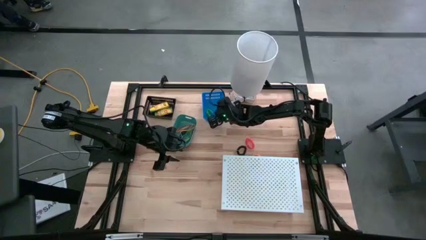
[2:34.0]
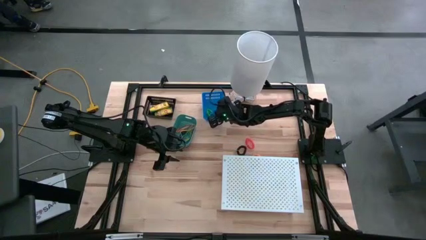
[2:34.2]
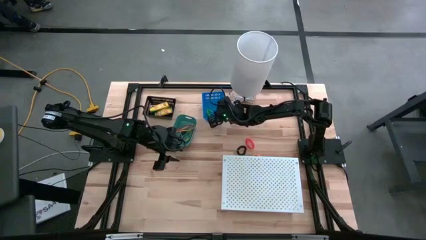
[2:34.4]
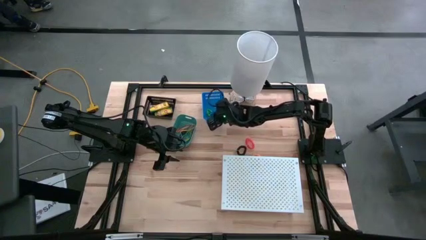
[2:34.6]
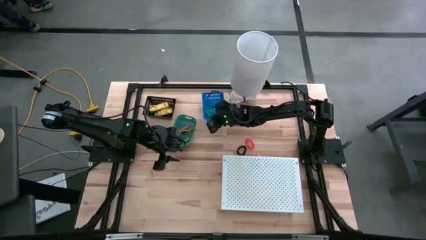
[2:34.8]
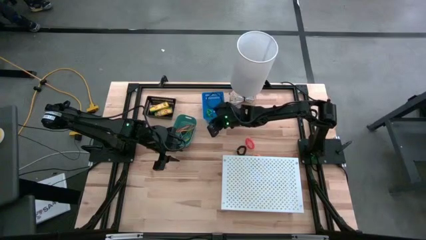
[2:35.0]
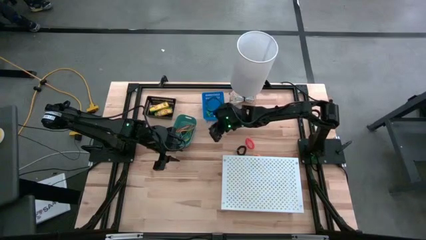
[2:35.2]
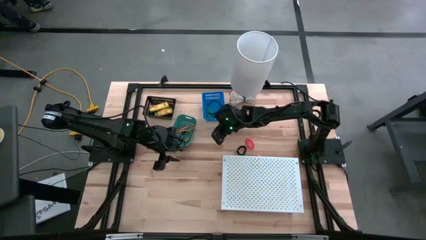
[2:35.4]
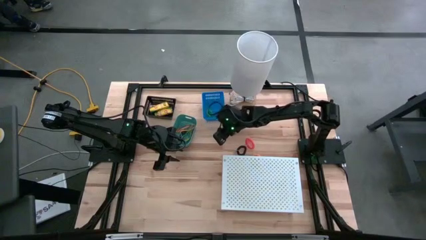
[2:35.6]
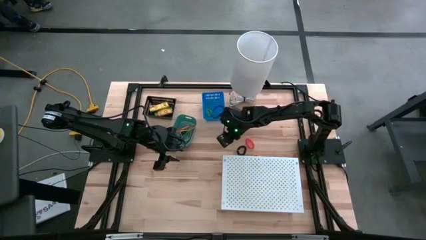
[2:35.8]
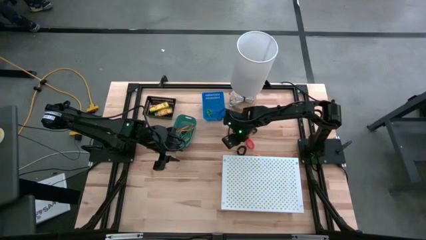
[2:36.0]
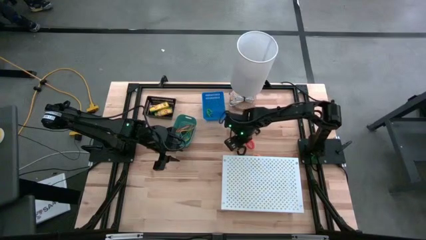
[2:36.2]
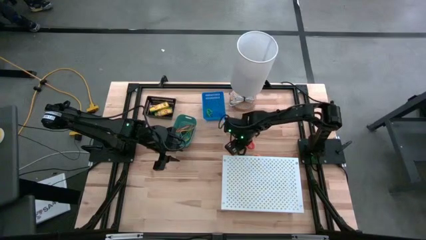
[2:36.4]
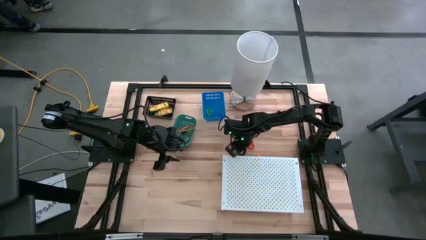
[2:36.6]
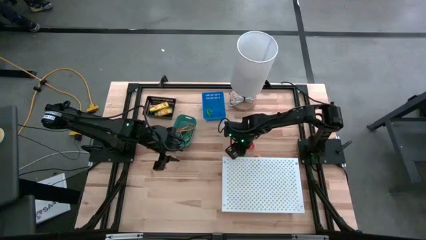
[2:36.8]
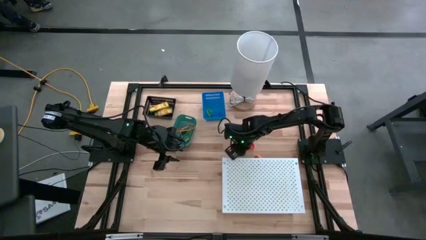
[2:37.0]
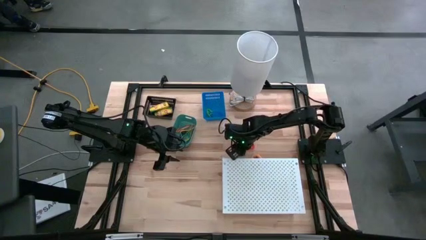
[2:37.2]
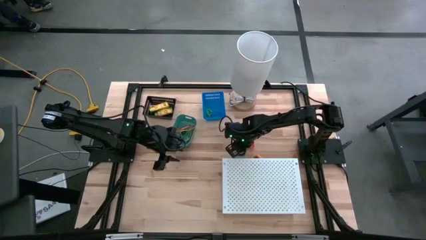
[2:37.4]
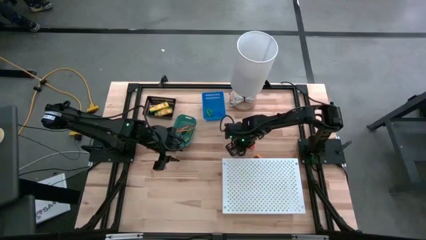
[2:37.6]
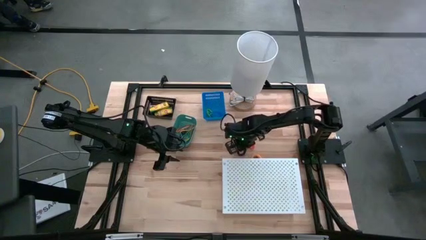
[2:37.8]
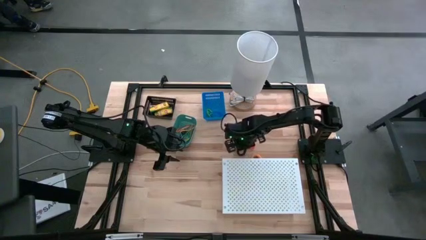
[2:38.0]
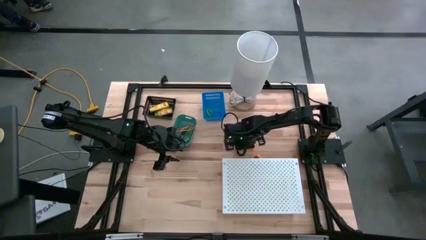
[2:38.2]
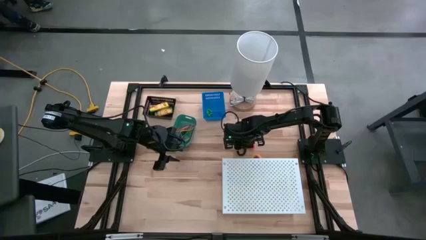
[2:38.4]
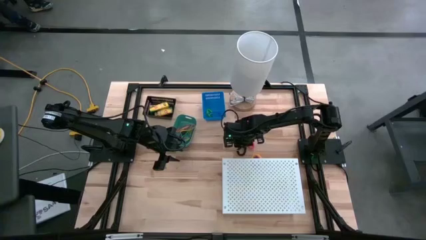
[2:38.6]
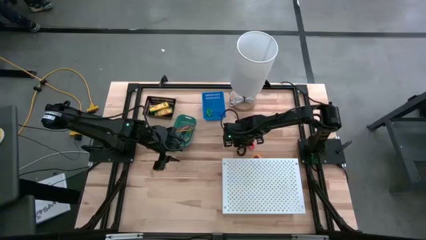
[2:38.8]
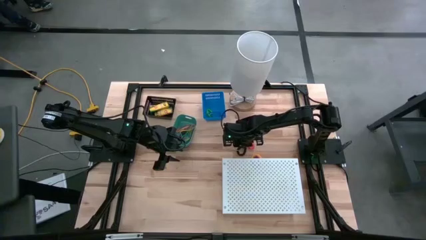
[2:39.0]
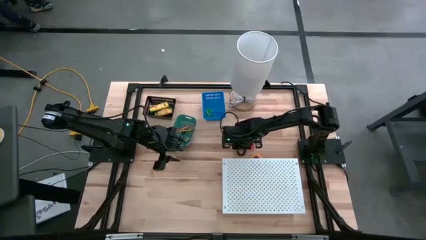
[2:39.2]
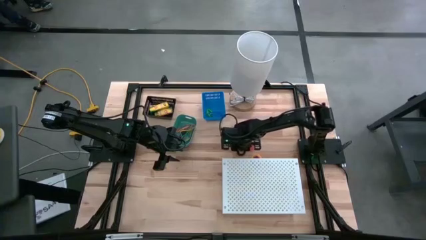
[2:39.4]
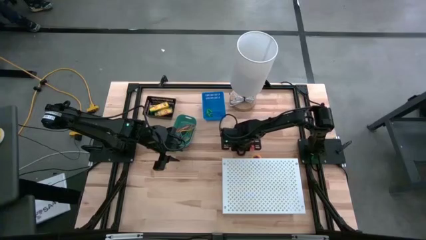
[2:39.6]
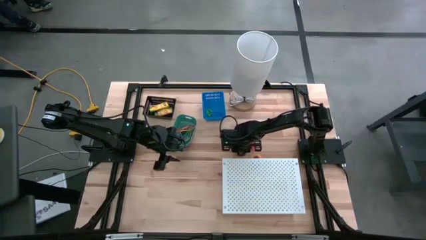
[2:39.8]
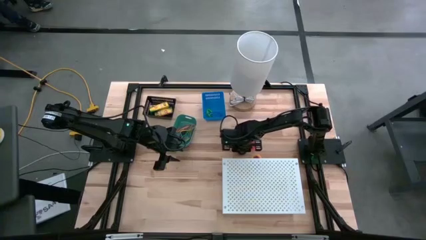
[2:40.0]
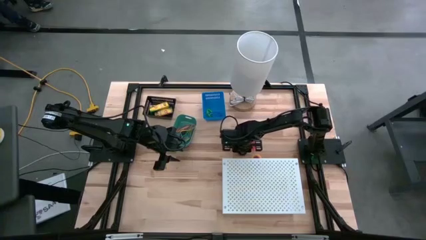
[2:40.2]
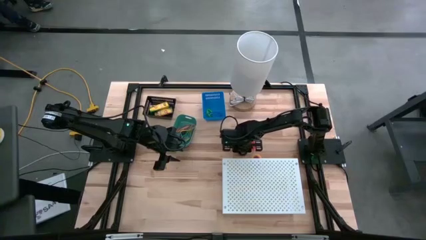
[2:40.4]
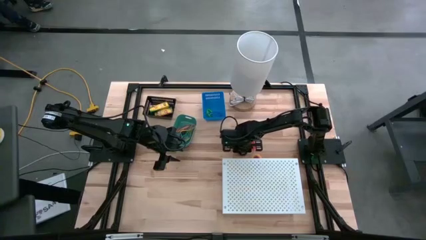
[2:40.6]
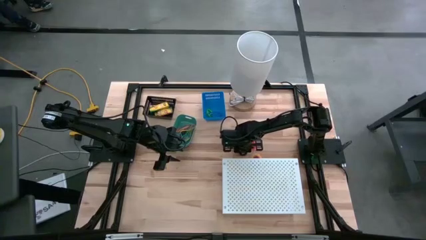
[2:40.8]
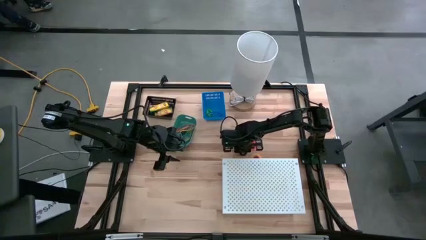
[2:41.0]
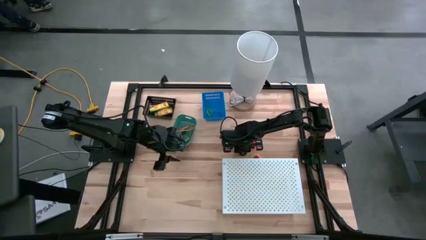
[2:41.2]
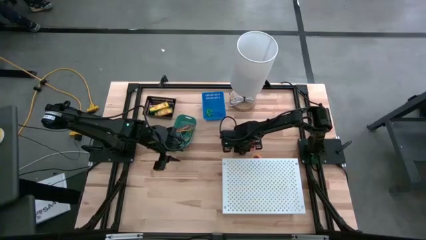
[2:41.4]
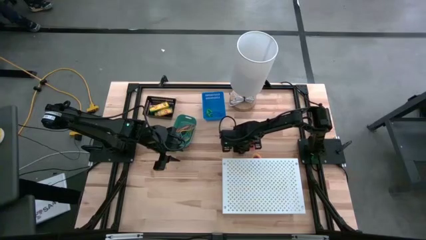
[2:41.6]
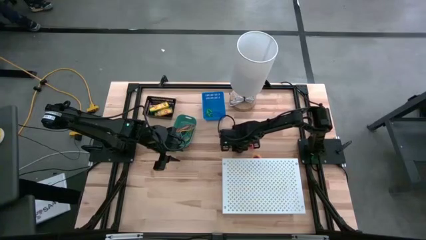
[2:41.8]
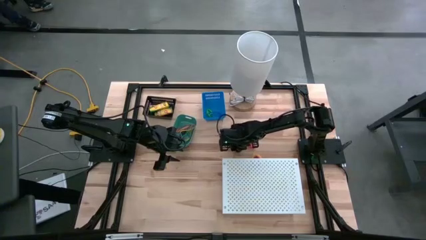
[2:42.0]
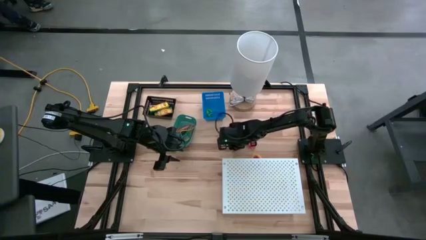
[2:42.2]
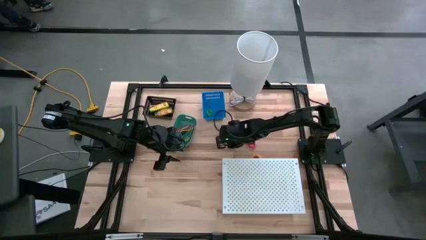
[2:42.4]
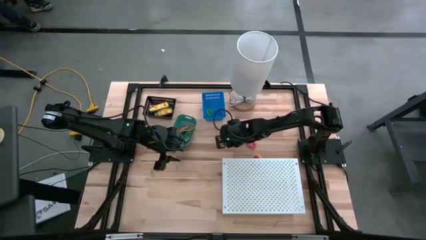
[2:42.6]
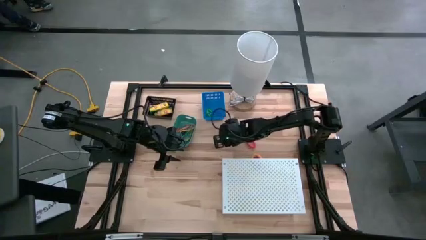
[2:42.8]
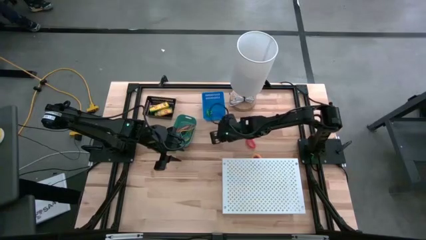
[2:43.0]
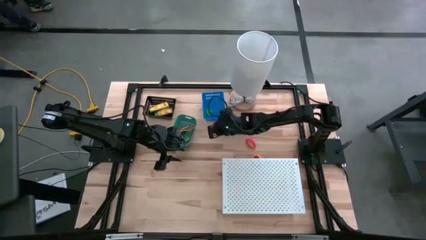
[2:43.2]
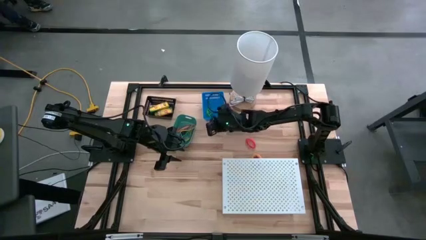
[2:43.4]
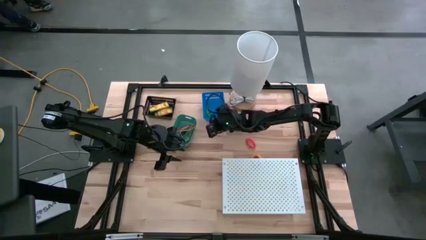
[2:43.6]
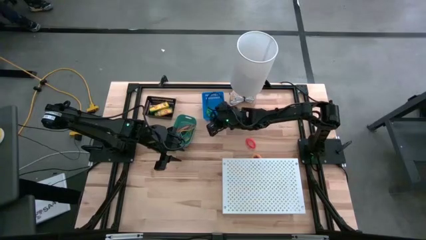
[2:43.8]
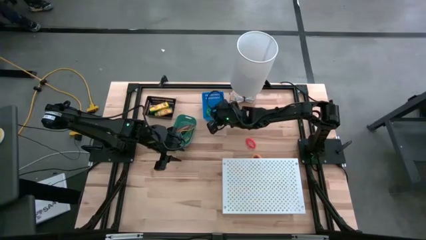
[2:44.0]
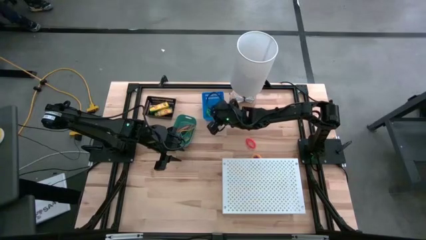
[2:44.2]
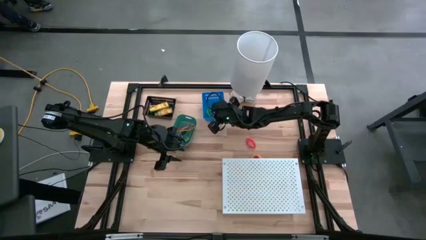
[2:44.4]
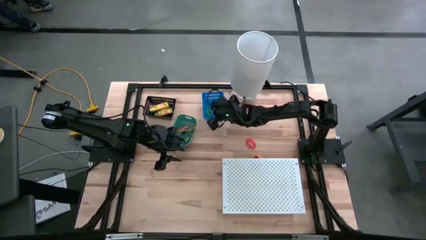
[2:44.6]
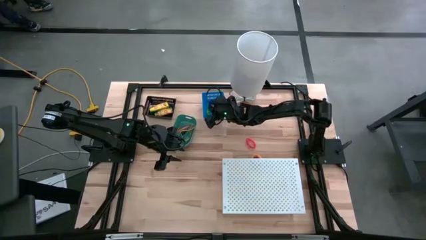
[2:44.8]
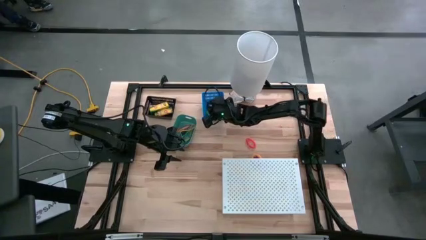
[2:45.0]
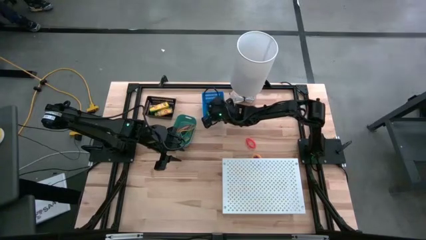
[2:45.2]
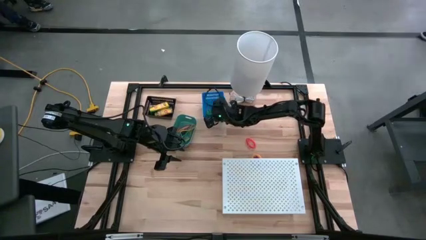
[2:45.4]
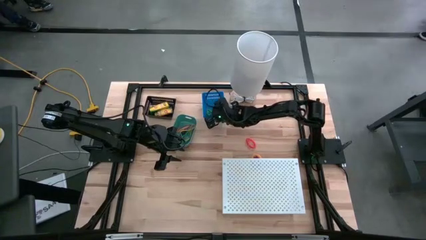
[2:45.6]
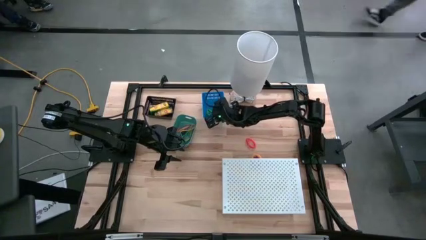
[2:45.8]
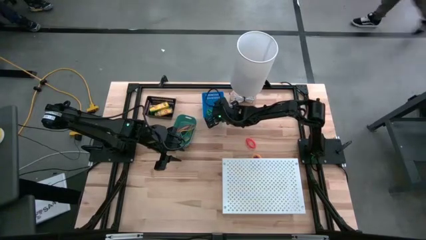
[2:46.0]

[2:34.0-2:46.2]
Task: Pick & Place Office Desk Supplies
Put the black spring keychain into the blue bin

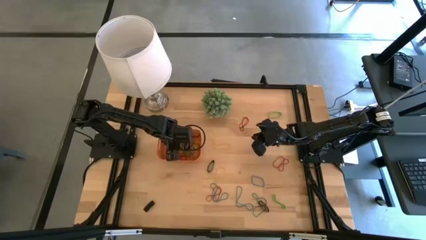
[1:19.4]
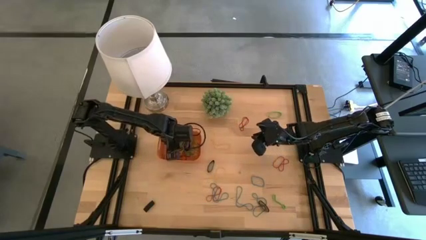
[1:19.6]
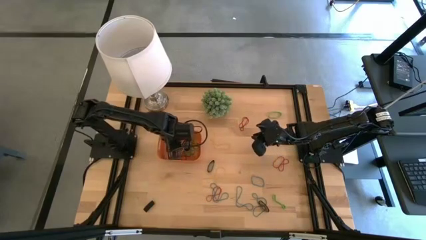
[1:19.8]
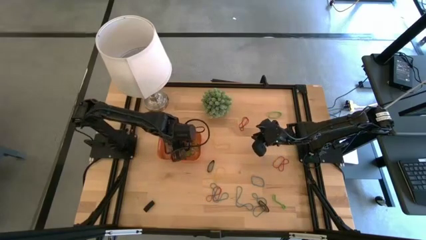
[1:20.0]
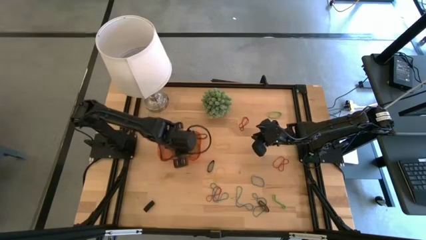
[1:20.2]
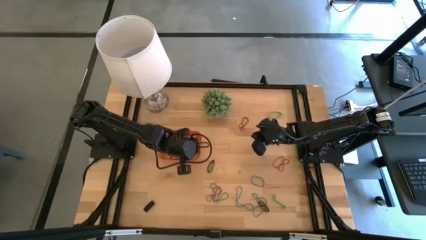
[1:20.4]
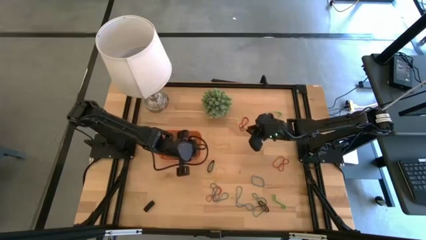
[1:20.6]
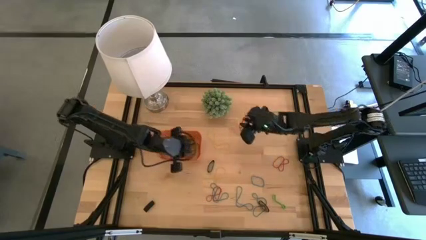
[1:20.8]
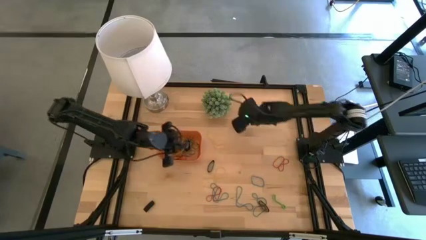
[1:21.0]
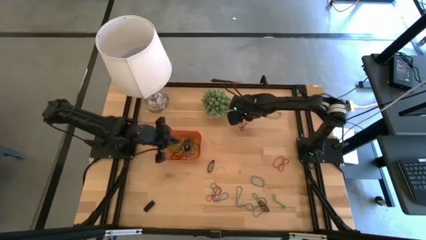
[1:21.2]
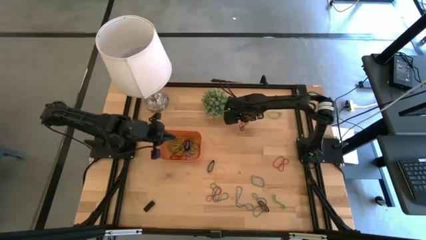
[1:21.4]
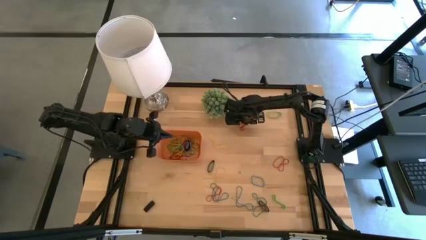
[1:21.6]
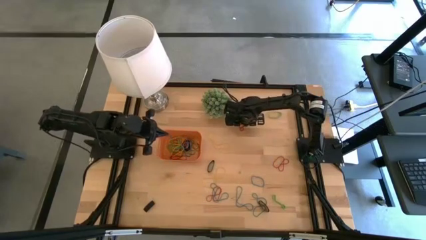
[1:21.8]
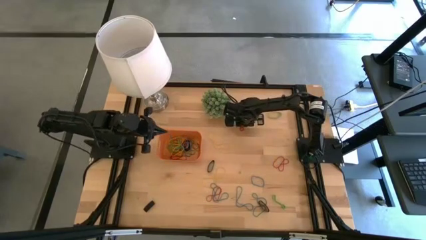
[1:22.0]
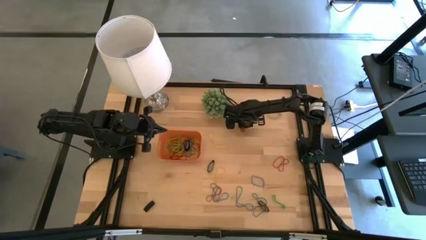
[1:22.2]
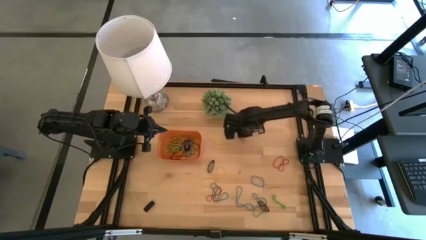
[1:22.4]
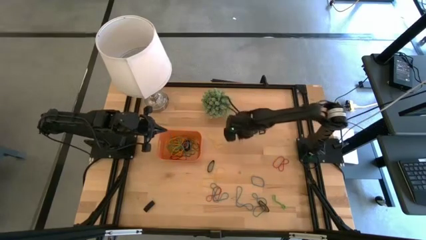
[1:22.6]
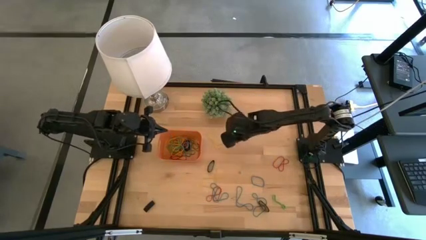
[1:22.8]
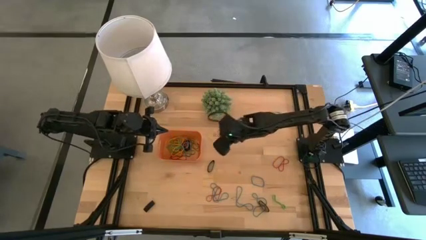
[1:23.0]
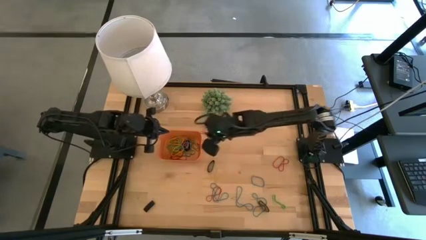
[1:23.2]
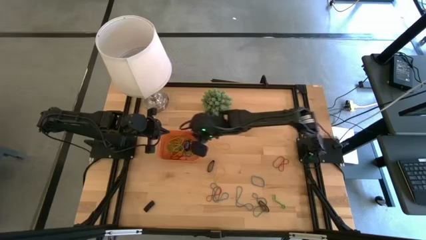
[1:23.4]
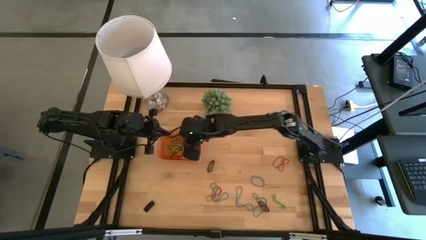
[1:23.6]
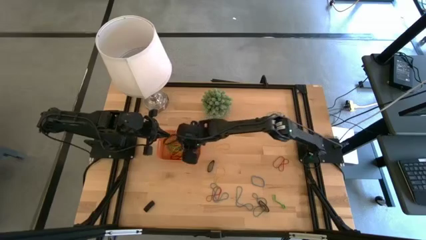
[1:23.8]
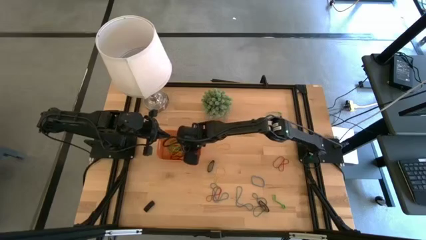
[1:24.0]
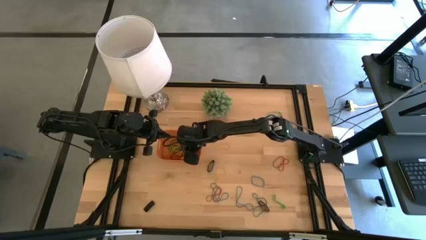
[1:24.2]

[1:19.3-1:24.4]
Task: Pick and place rubber bands into bin
Put the red rubber band into the orange bin
